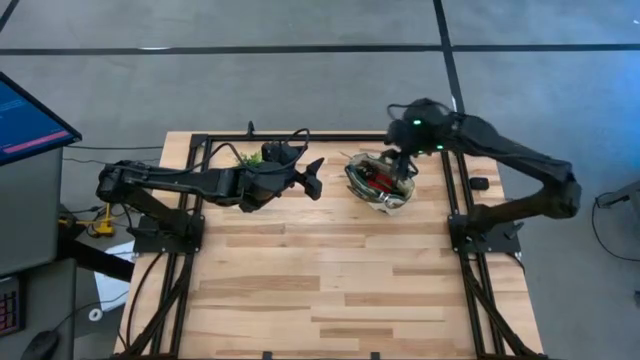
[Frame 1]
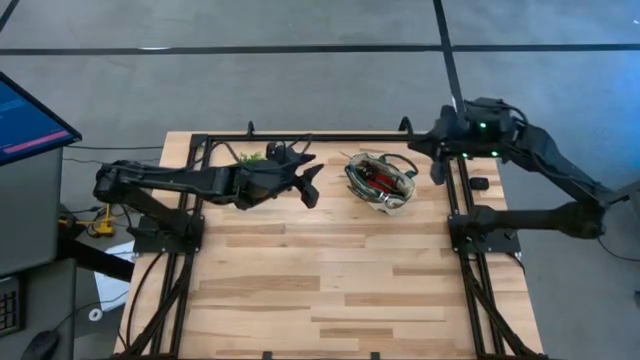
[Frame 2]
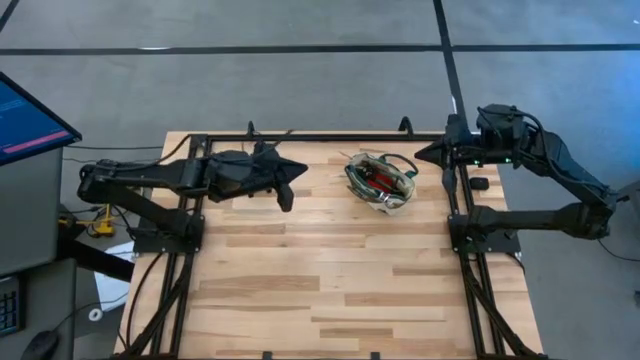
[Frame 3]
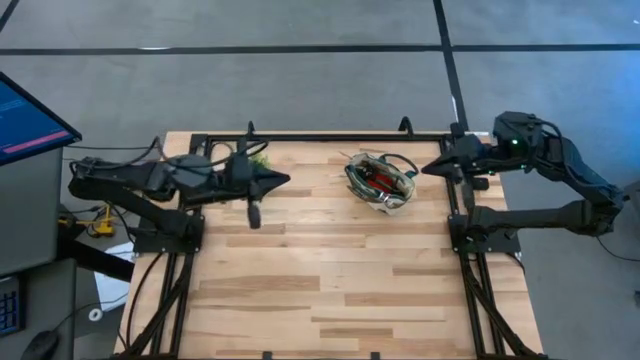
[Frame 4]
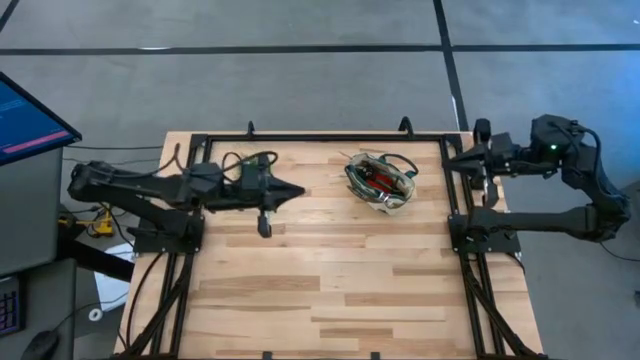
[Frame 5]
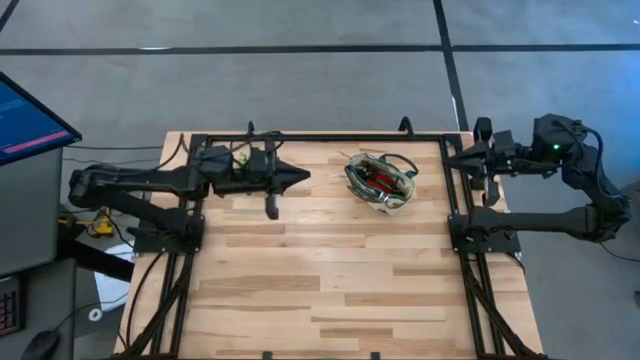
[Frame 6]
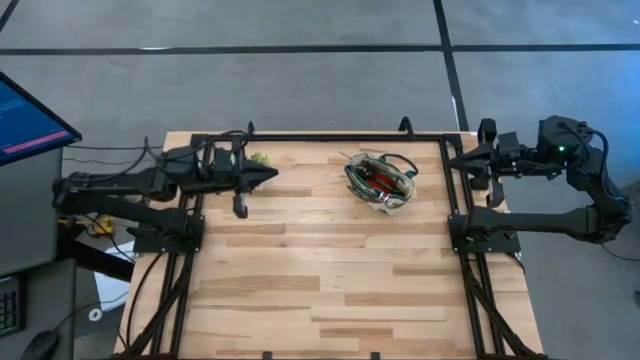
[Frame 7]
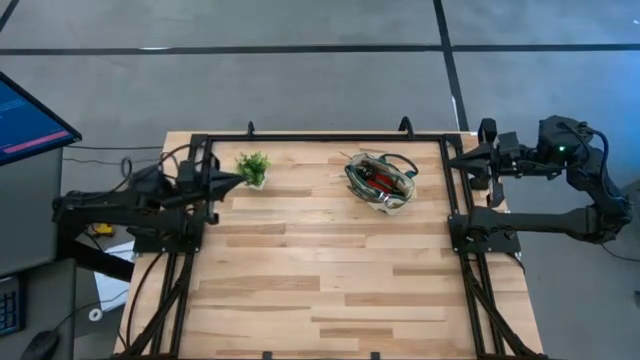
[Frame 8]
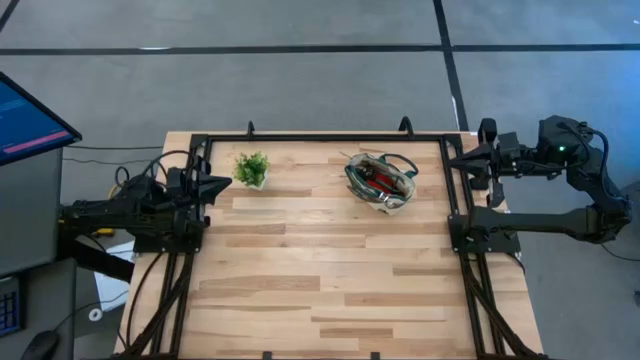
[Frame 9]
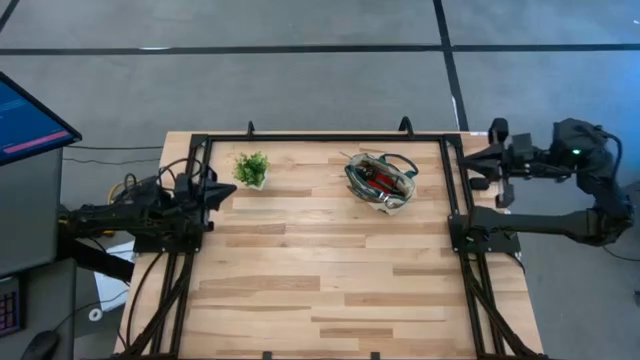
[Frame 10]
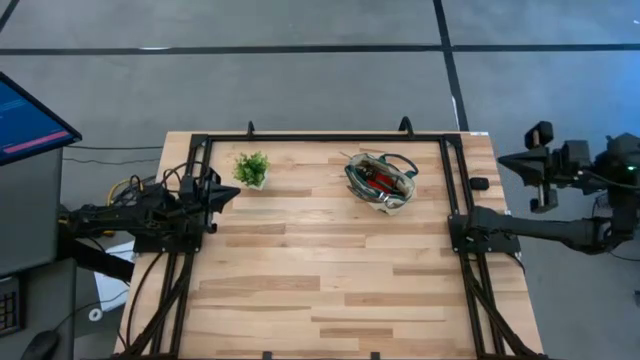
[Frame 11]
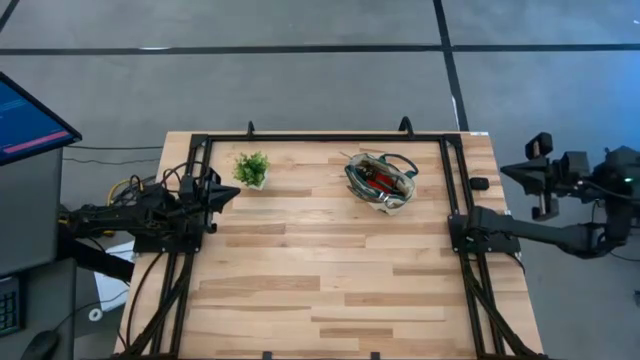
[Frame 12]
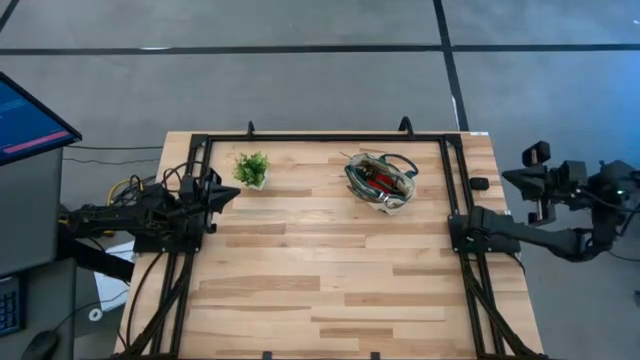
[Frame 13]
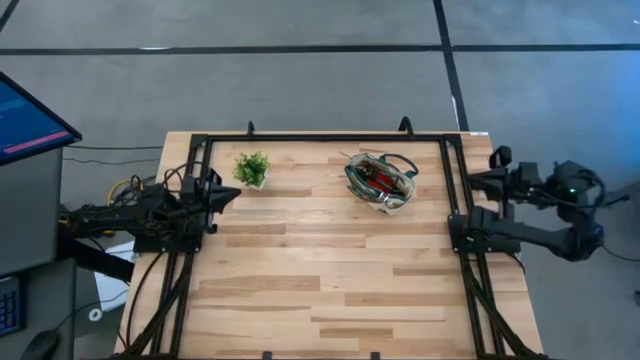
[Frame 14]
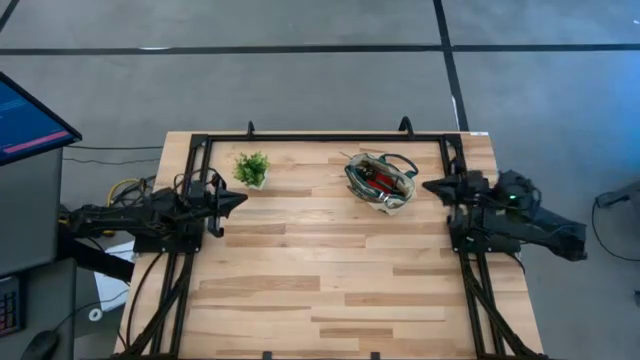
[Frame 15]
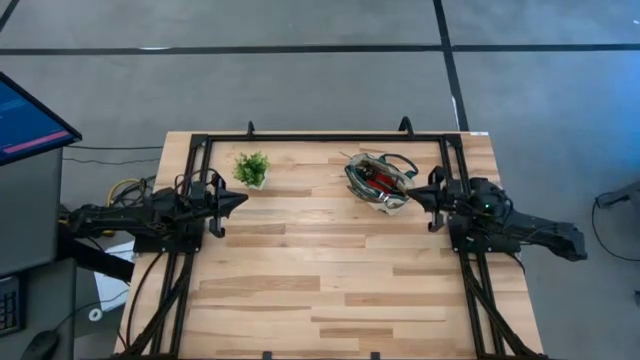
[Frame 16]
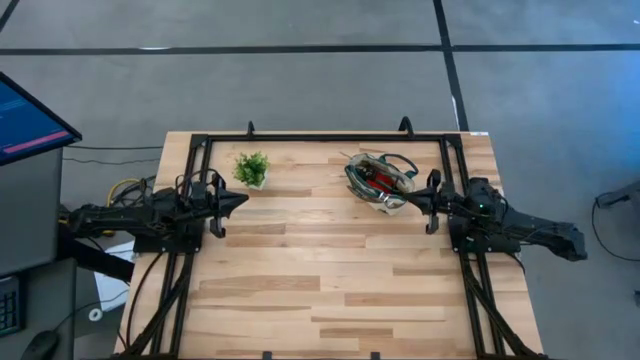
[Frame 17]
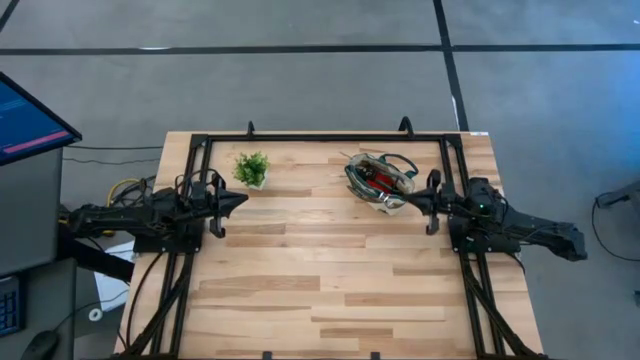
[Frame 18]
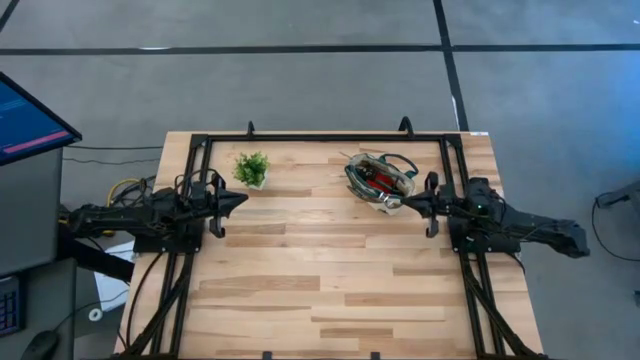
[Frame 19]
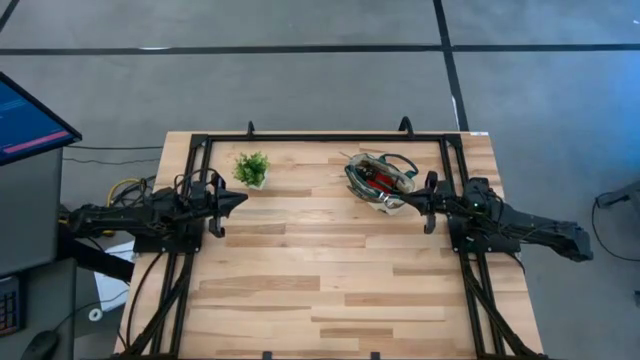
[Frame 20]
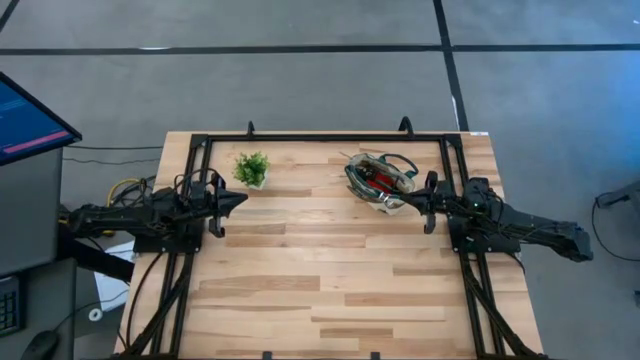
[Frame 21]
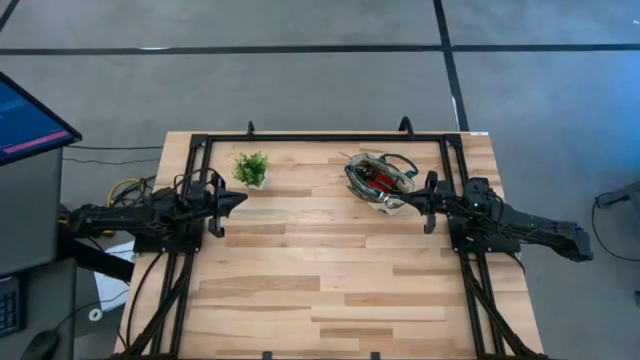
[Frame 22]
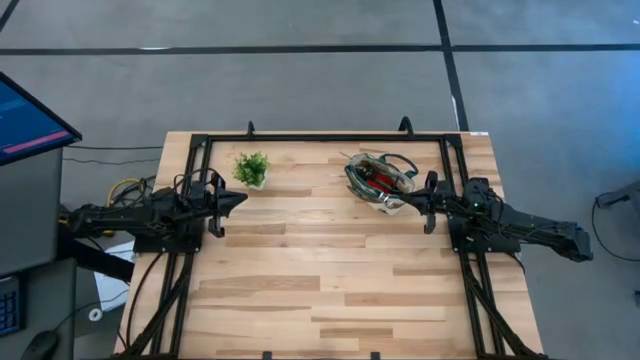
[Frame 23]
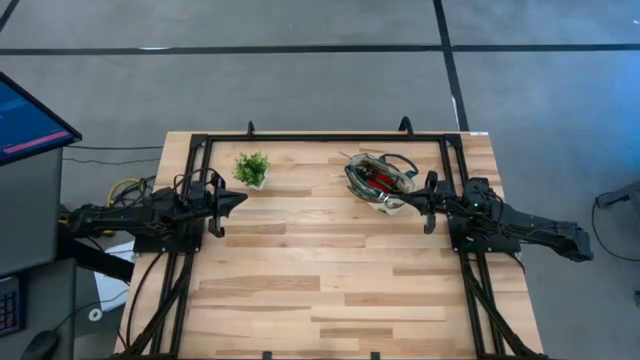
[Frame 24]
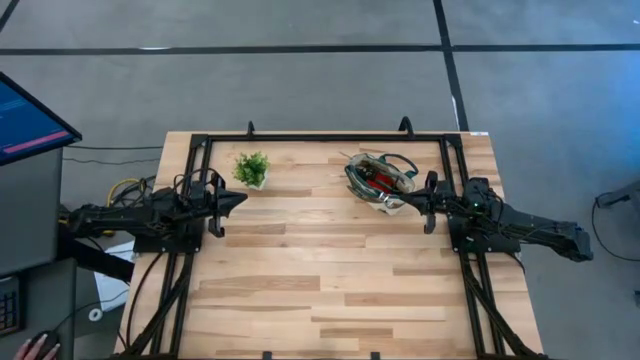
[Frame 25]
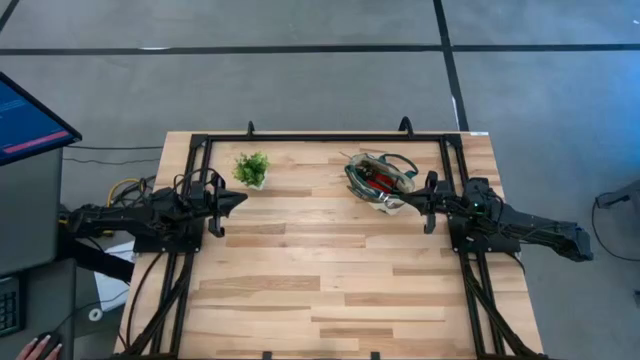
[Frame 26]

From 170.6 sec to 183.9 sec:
Task: Pick & Place Garden tools in Gardening bag
Return to Home Position

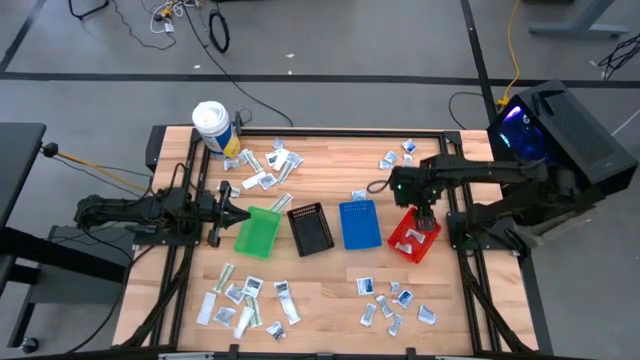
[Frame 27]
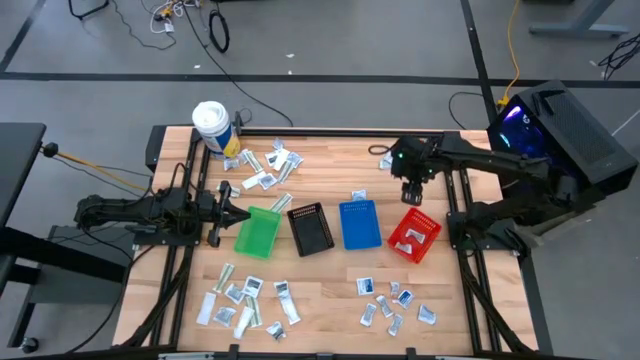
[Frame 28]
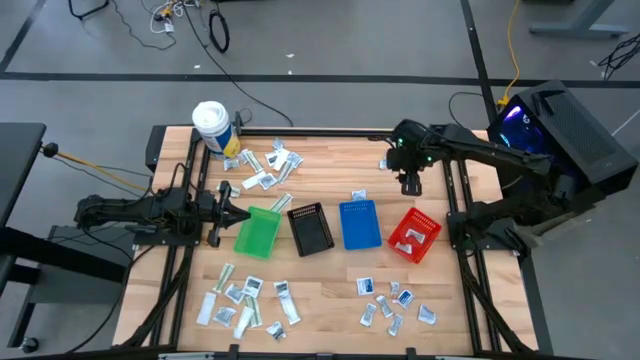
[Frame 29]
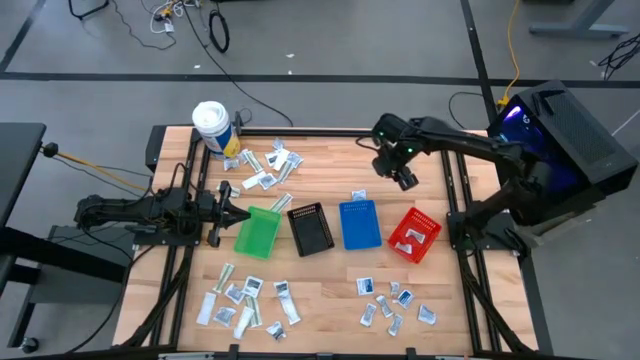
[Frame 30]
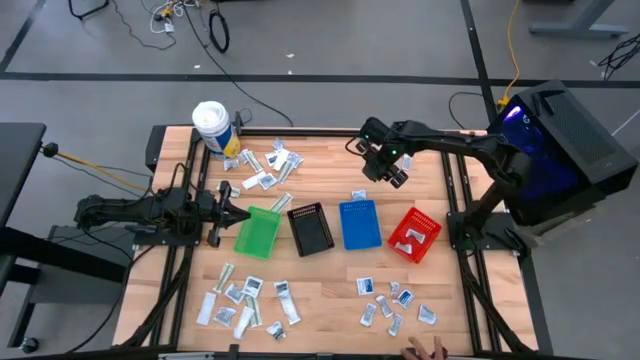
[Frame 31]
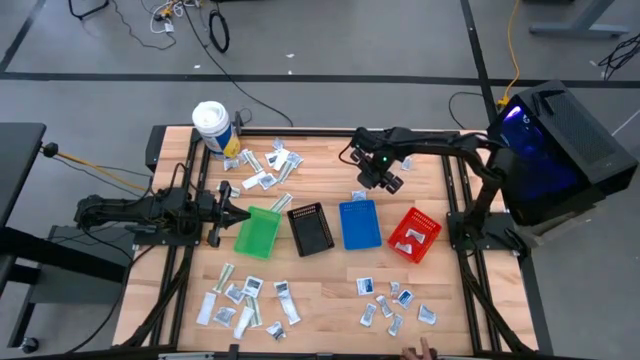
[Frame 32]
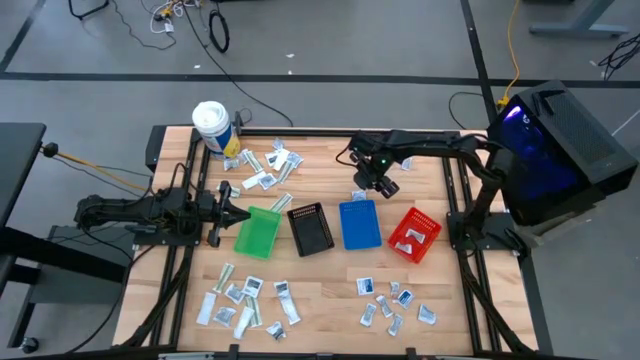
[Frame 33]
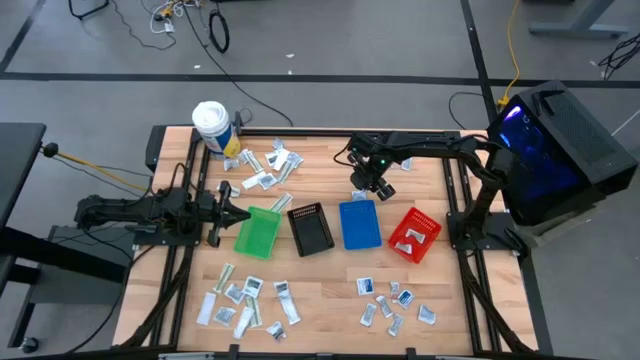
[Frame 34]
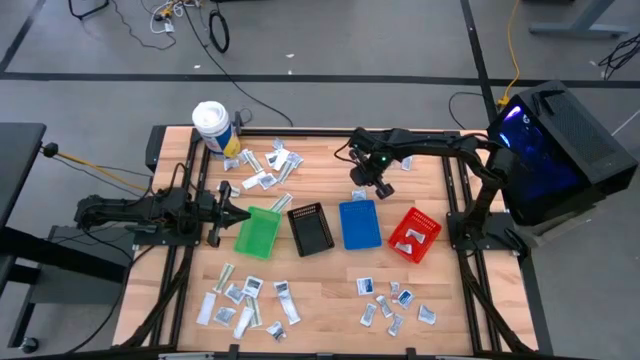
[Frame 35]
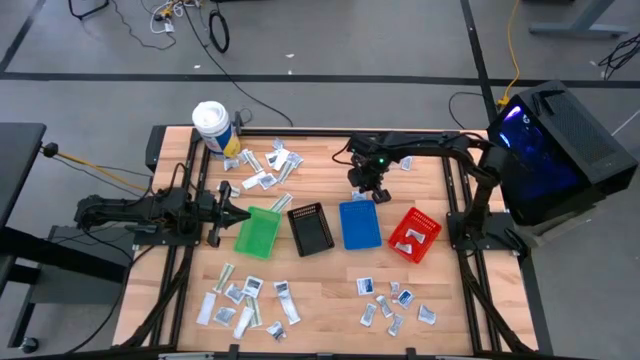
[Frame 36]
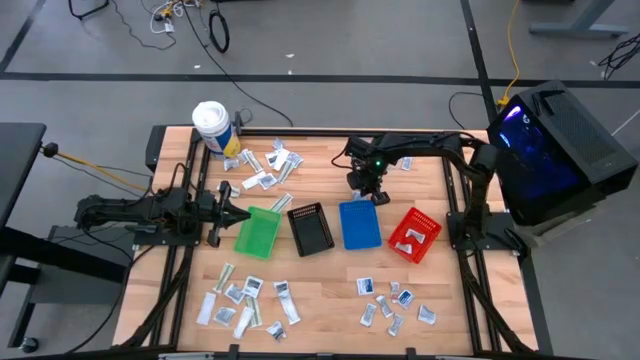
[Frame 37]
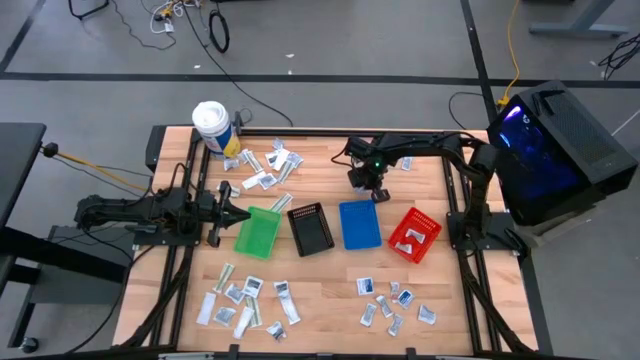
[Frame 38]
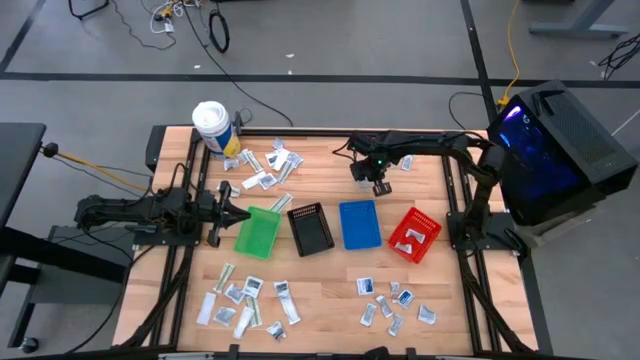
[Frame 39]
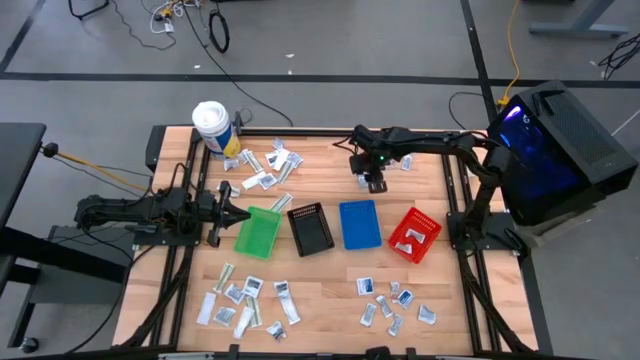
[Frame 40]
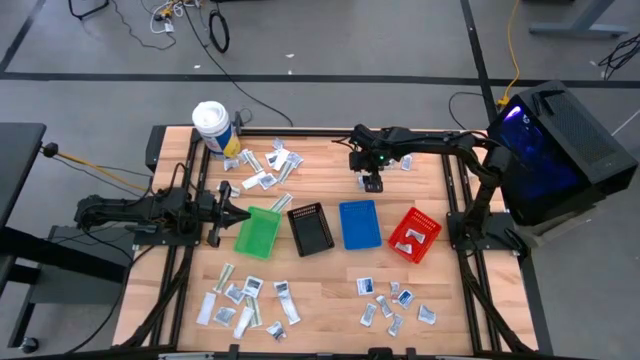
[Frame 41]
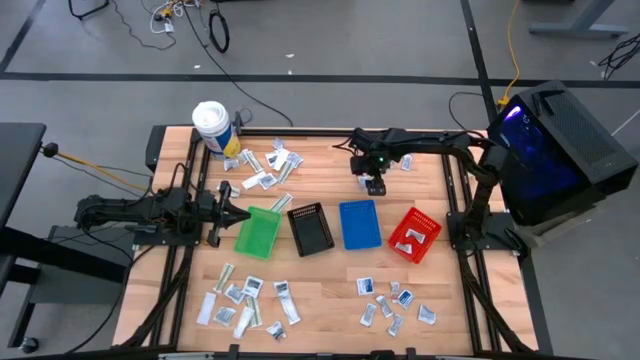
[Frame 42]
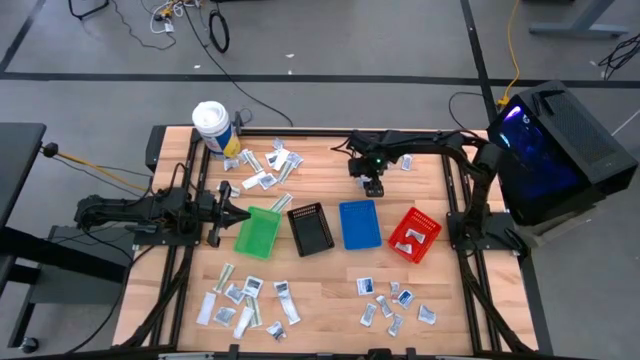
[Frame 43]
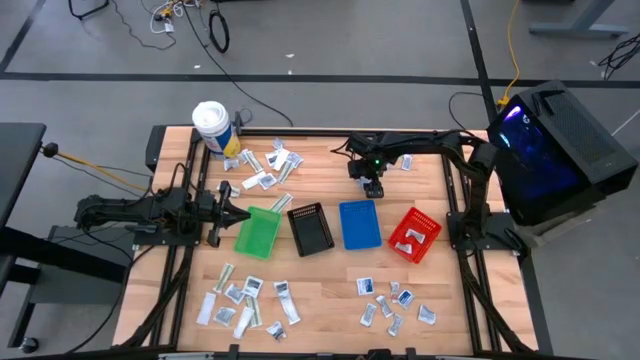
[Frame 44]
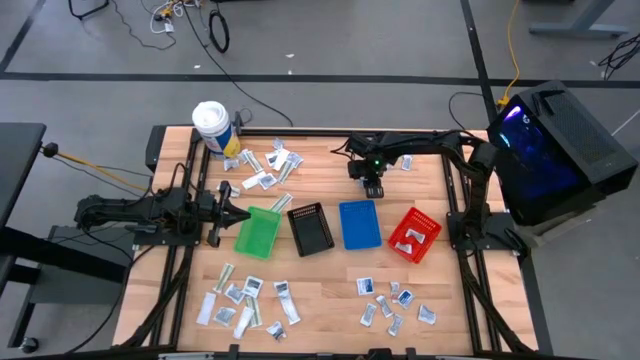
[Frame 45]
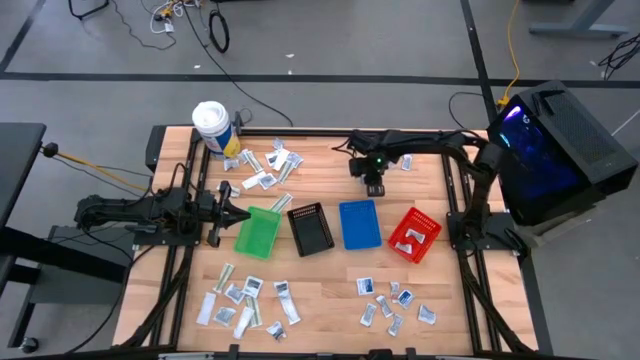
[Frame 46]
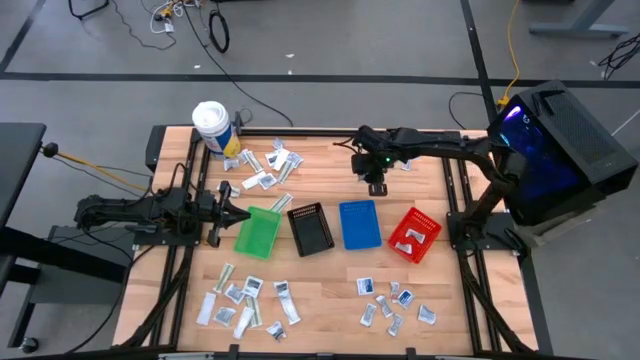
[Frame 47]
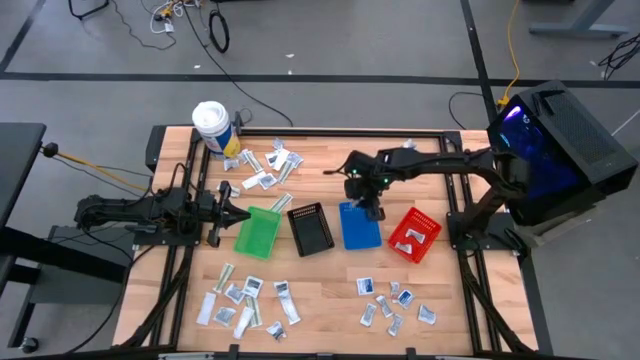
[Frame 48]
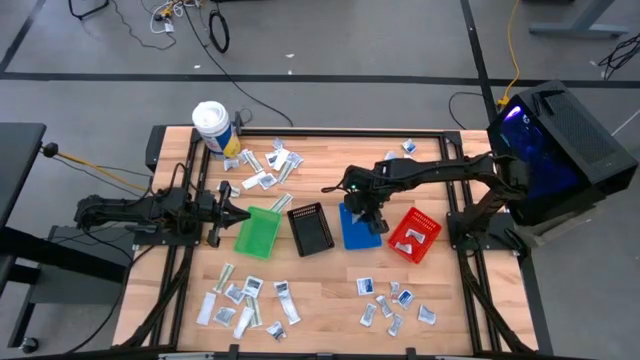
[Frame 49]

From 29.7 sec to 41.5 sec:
Task: Pick & Place First Aid Supplies
Put the alcohol pad into the blue basket
